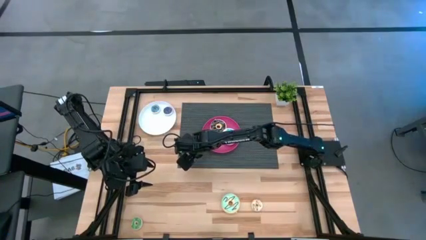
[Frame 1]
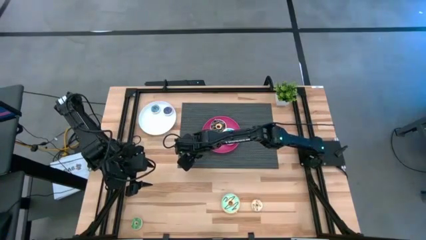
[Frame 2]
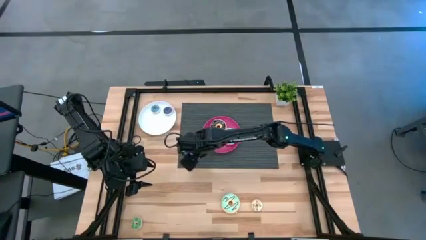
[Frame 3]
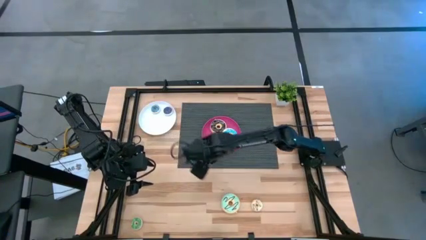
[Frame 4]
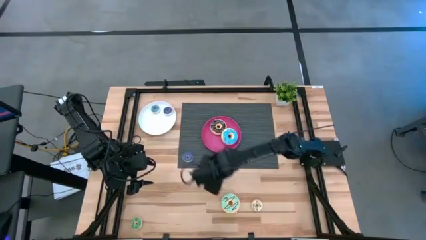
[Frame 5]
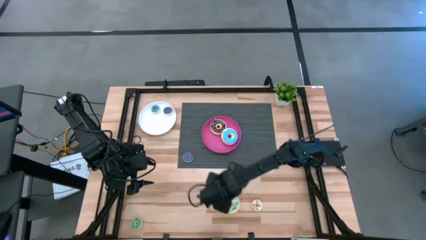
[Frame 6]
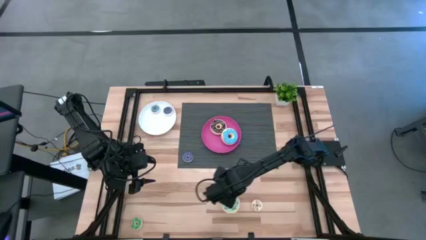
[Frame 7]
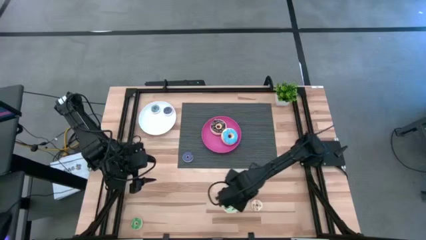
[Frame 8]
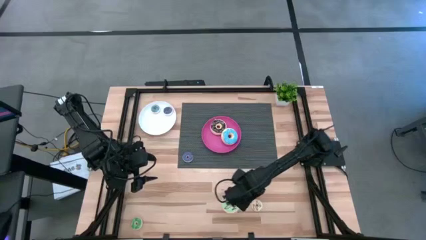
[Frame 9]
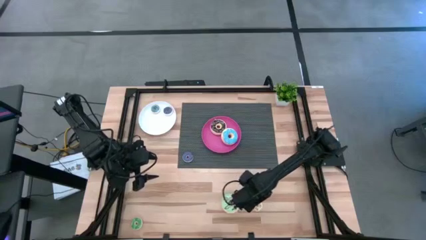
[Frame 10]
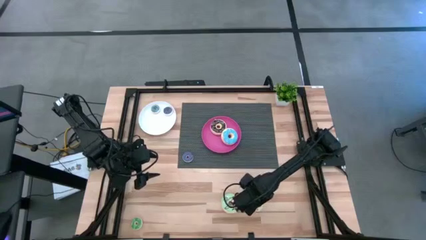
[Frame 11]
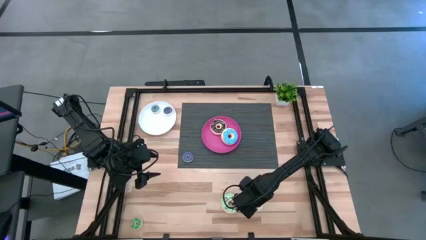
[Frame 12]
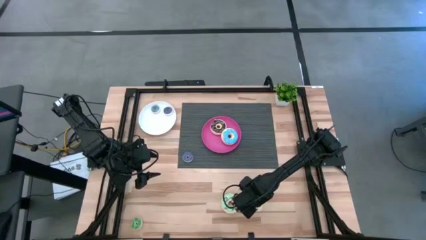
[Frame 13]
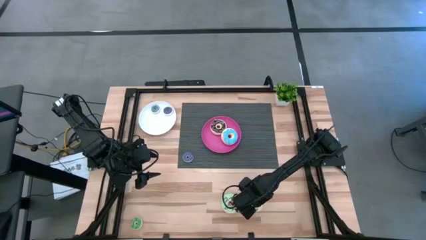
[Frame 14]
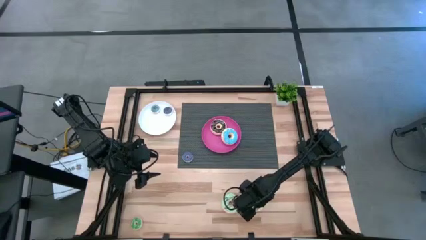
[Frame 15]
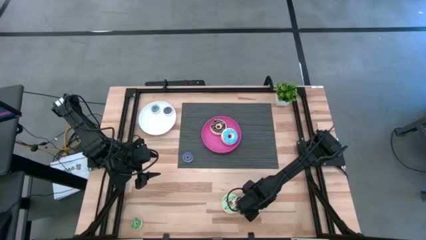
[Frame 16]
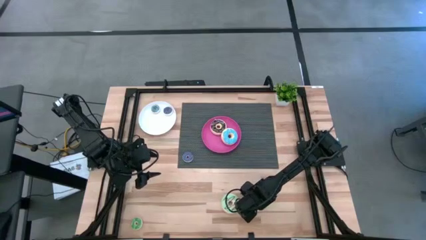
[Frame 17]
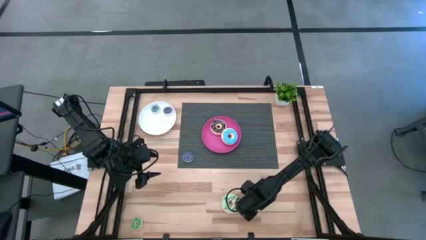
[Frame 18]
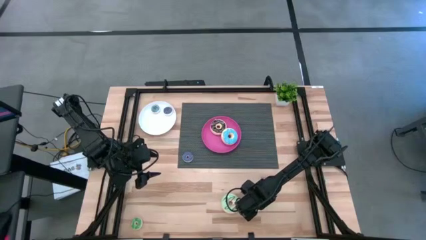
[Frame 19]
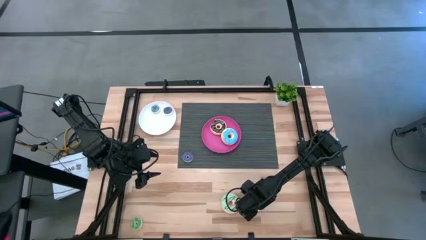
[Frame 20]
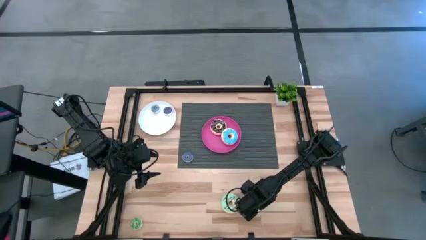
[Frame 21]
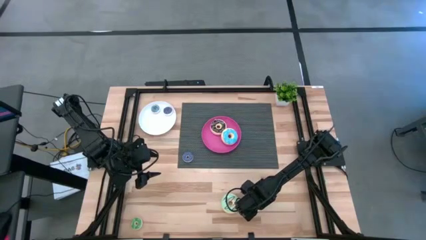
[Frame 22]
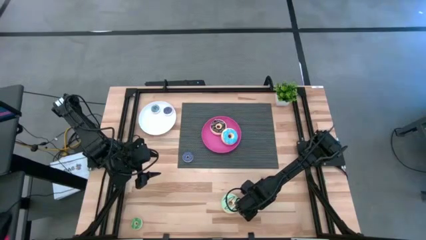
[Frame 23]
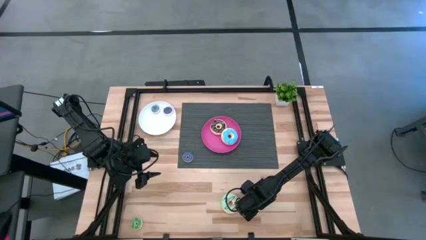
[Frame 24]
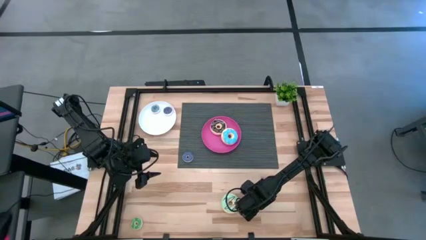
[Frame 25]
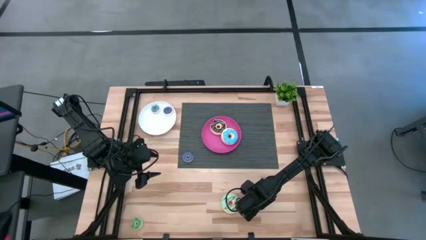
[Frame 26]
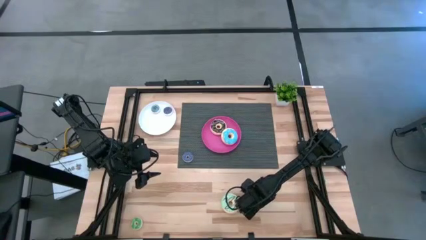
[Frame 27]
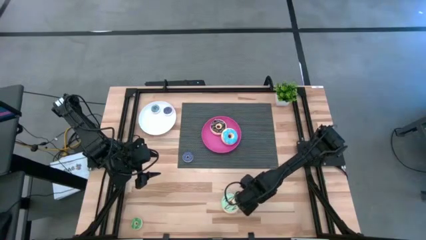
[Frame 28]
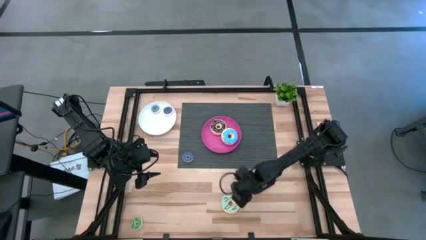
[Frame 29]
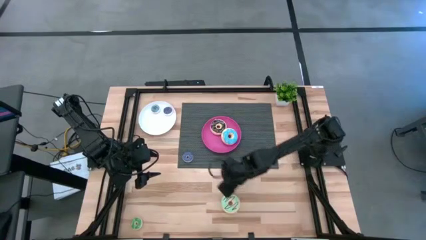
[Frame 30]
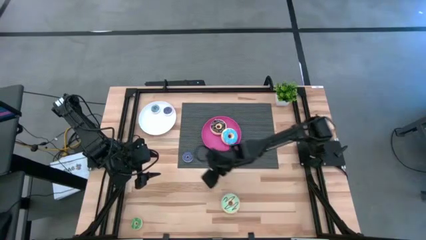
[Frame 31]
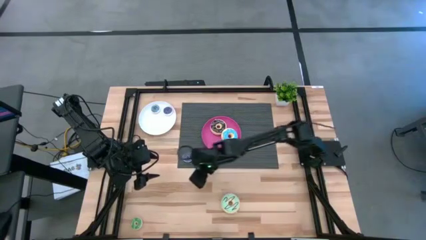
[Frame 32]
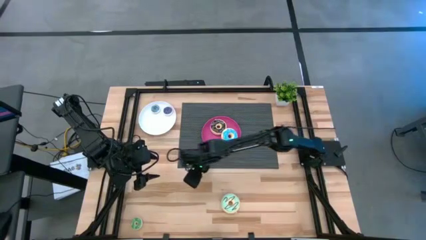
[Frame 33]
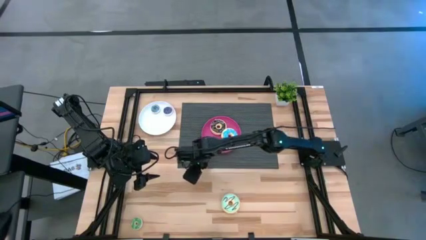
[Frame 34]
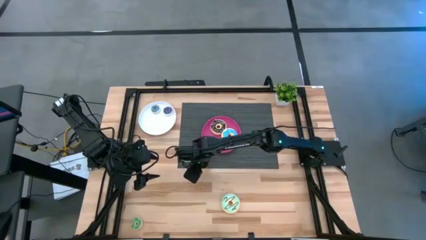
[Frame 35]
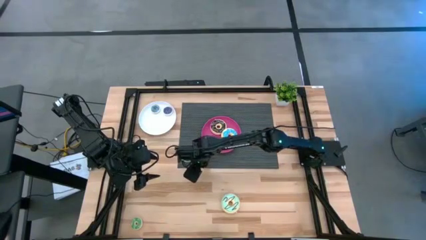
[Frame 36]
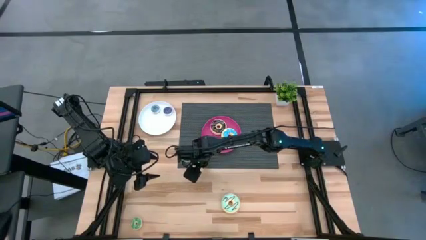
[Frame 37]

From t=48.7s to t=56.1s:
Task: Pick & Place donuts
Move the small white donut to the center of the table

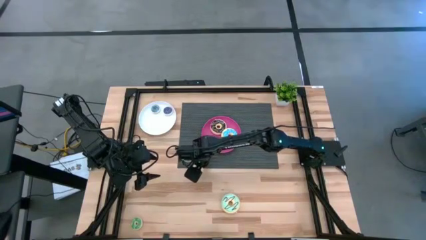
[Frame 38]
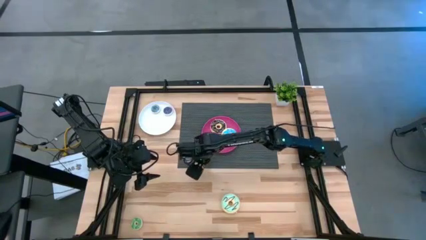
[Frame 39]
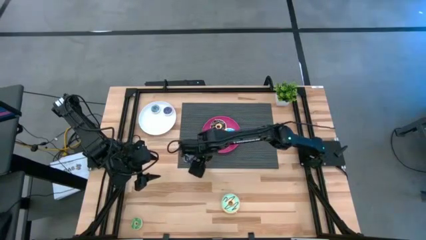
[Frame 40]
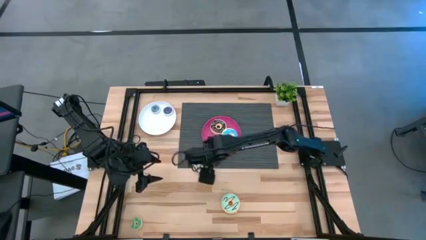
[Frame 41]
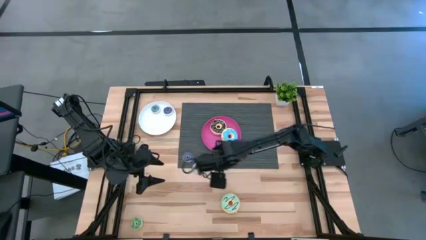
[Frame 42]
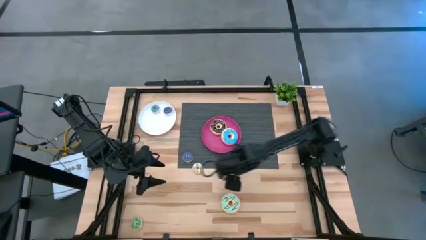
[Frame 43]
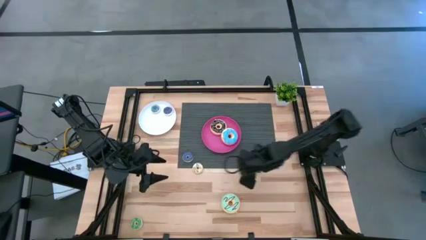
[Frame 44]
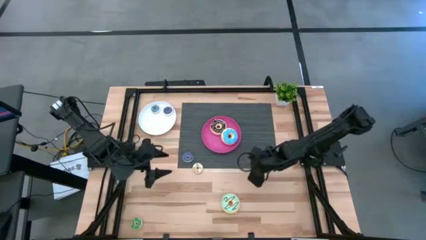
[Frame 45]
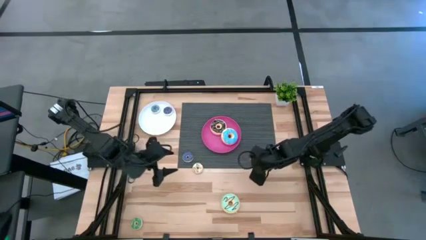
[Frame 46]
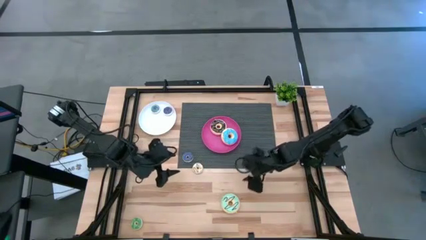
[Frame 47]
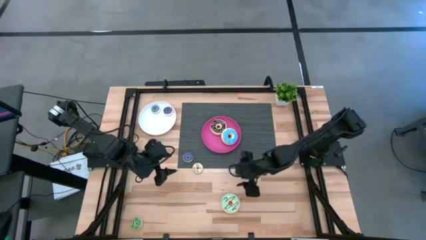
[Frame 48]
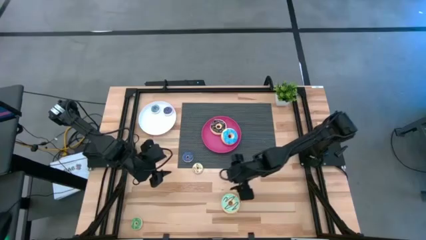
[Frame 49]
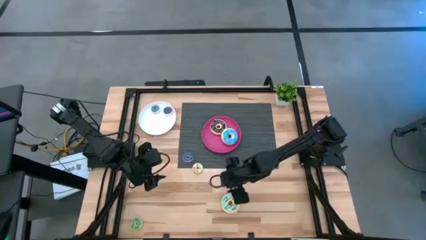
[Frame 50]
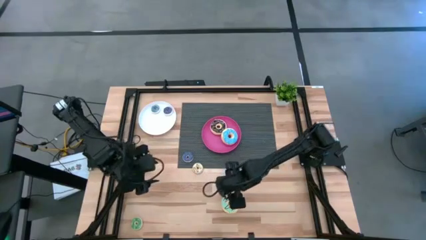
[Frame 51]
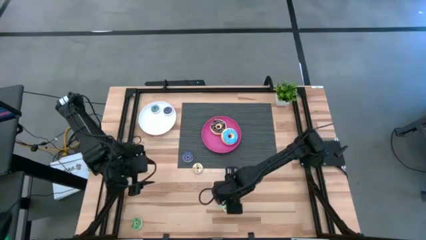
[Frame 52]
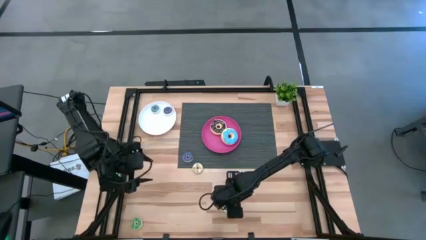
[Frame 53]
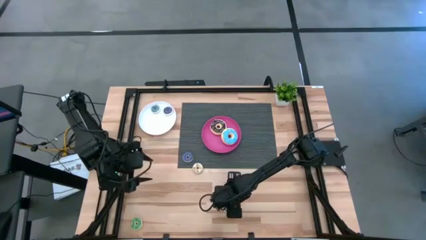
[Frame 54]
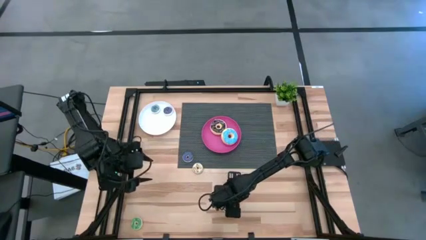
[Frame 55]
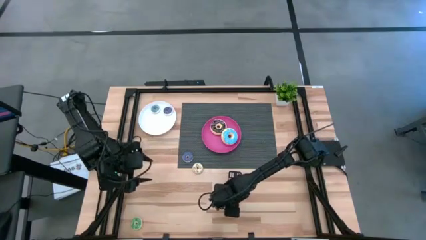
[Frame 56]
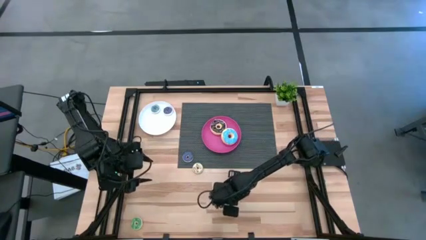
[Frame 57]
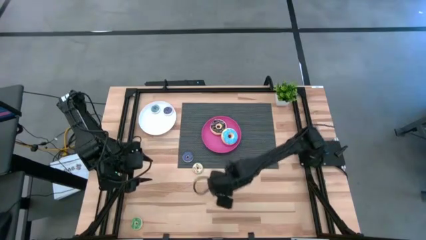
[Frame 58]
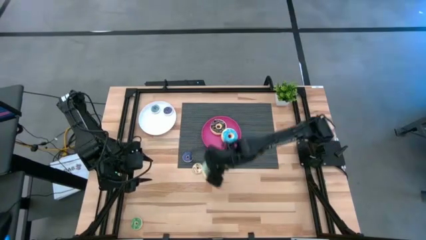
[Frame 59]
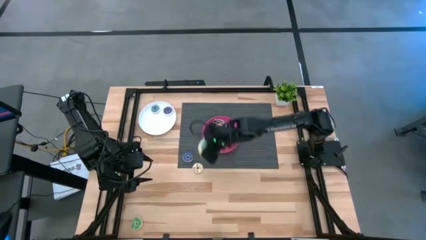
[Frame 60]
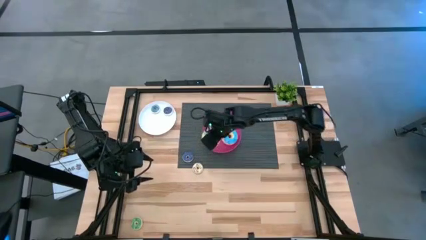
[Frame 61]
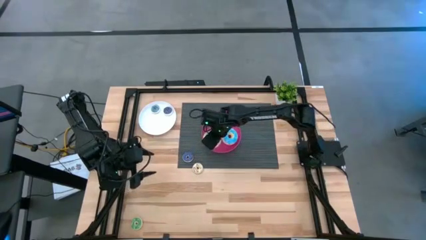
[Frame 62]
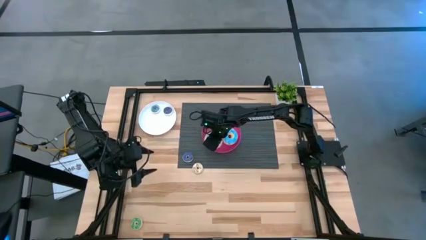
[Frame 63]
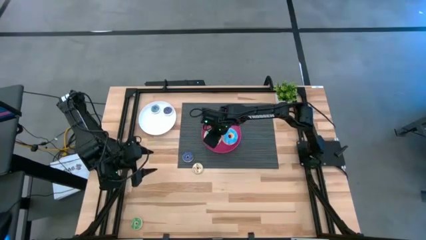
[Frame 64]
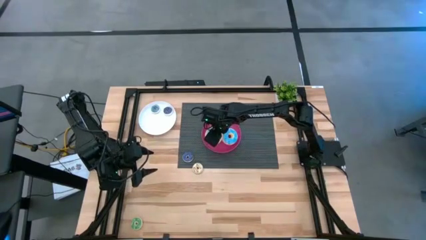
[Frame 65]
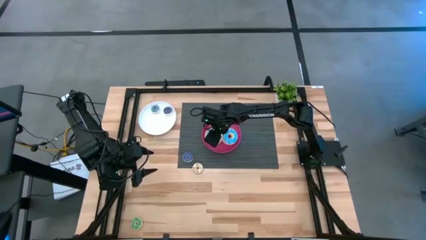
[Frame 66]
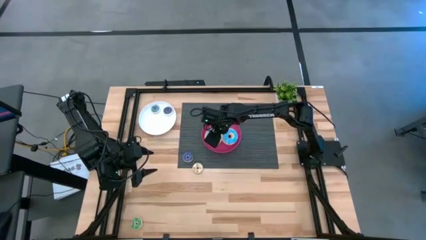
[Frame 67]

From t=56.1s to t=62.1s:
Put the big light green donut on the pink plate

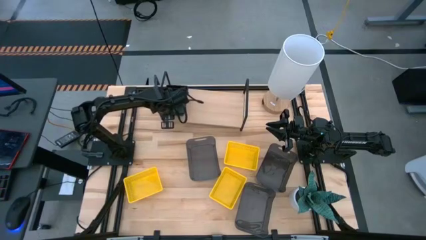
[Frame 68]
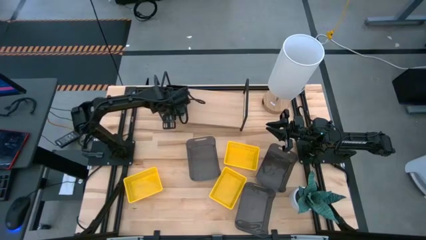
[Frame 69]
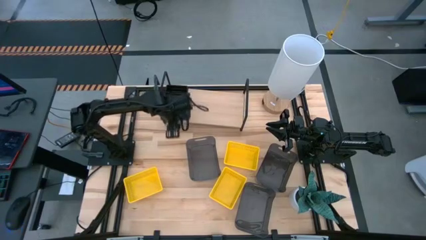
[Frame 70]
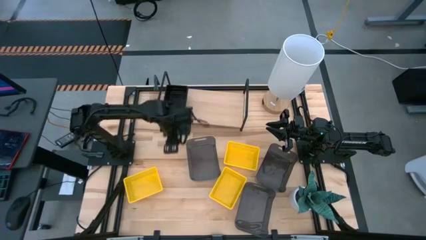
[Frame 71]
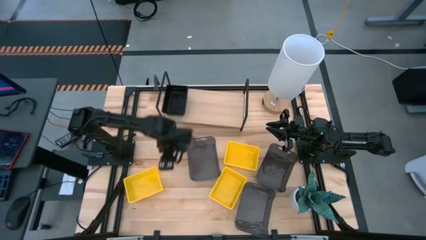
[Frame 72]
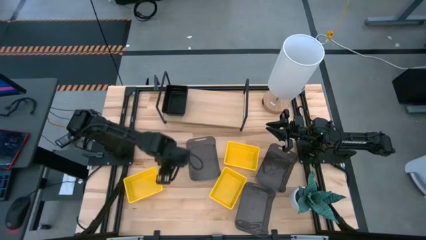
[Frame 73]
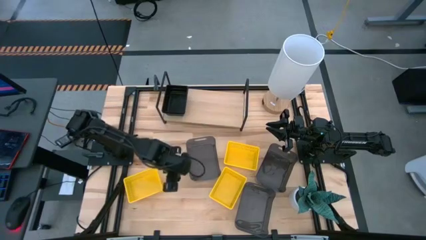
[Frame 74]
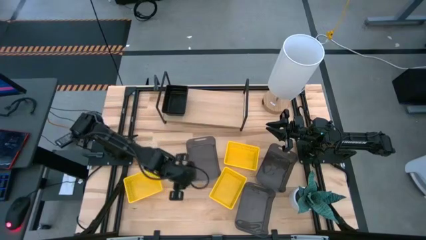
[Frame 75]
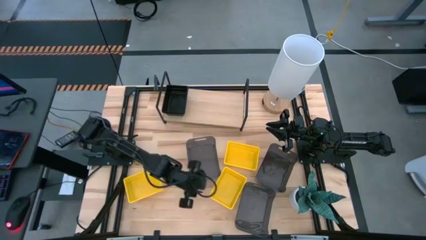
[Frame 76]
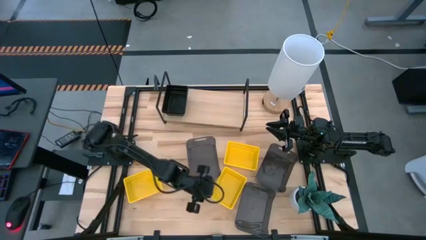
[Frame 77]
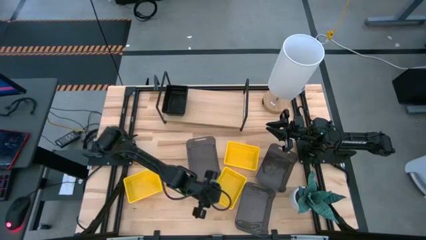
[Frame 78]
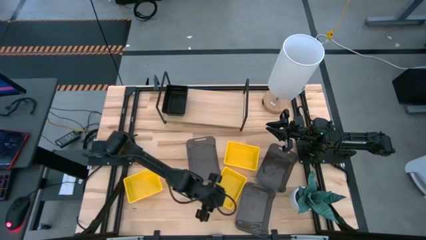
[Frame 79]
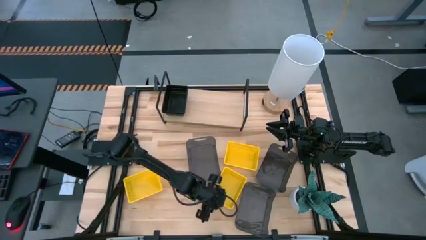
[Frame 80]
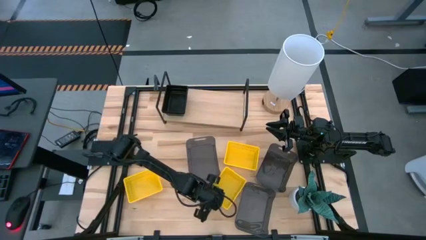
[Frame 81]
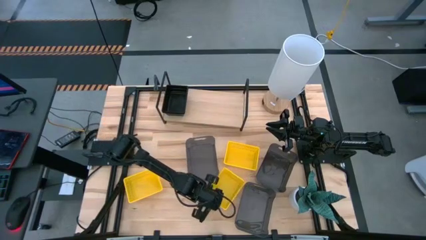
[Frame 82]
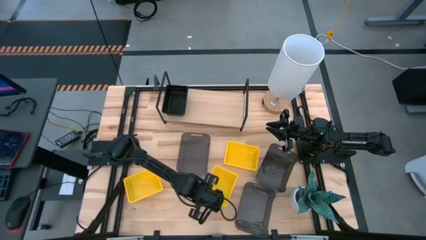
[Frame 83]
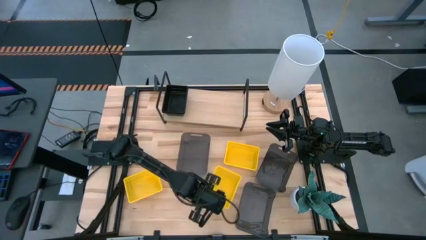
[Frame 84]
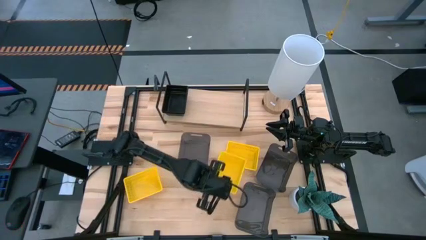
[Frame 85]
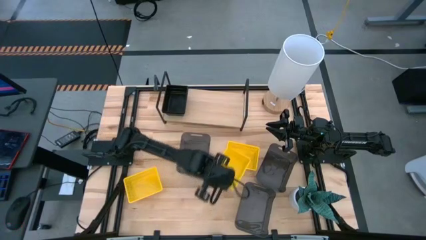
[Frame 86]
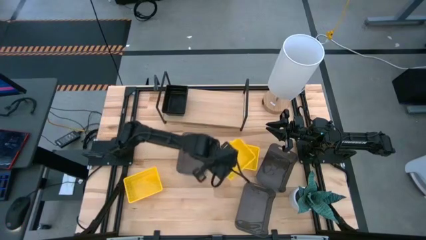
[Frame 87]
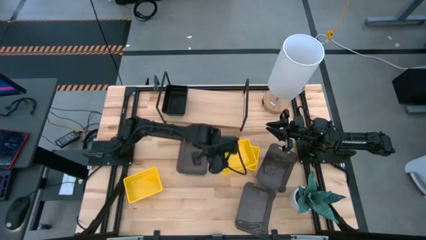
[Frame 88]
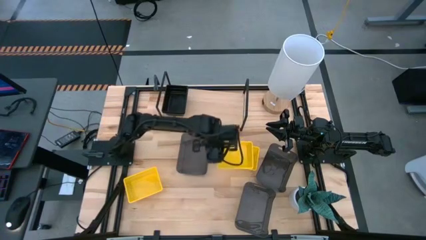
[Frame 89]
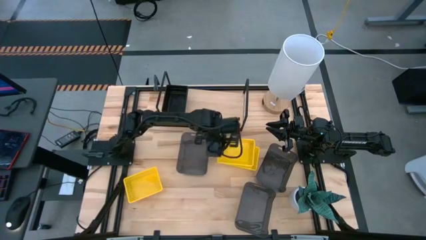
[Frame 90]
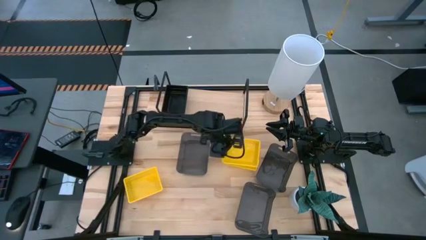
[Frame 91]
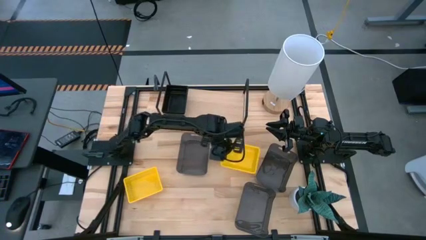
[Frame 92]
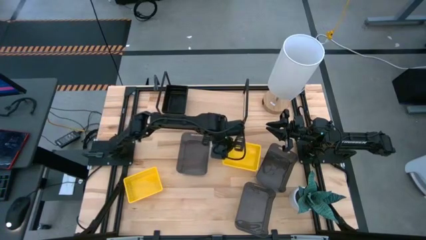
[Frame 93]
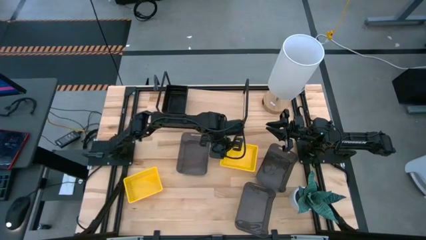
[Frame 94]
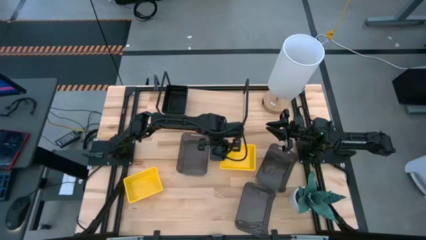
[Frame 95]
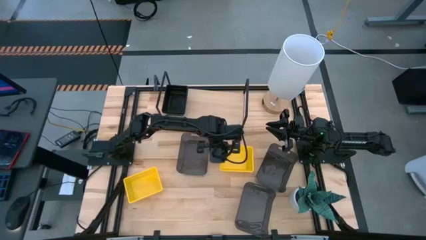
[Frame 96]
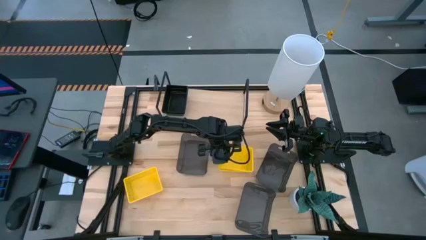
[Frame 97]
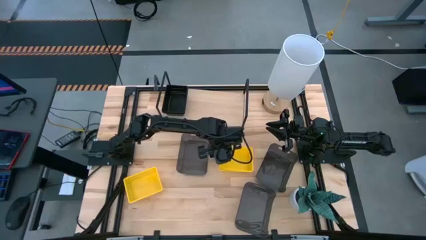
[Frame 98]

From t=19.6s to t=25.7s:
Task: Stack baskets on shelf by color
Stack the bottom right yellow basket on top of the top right yellow basket
